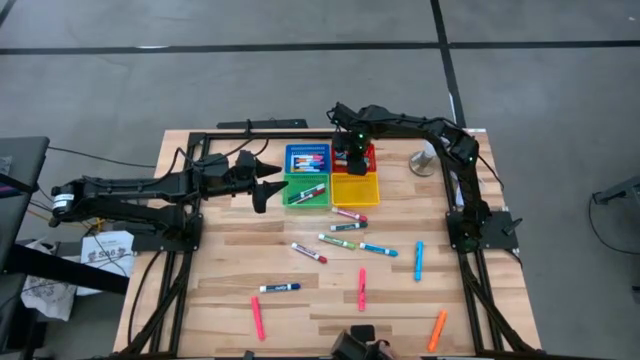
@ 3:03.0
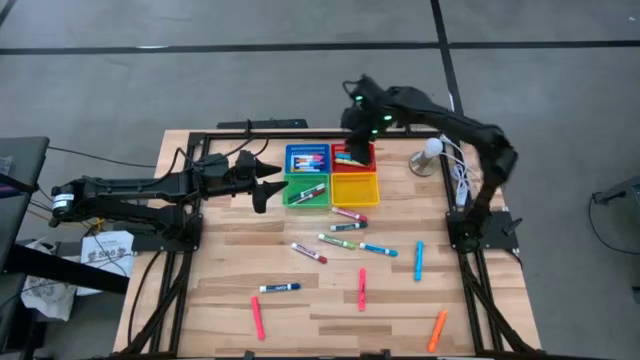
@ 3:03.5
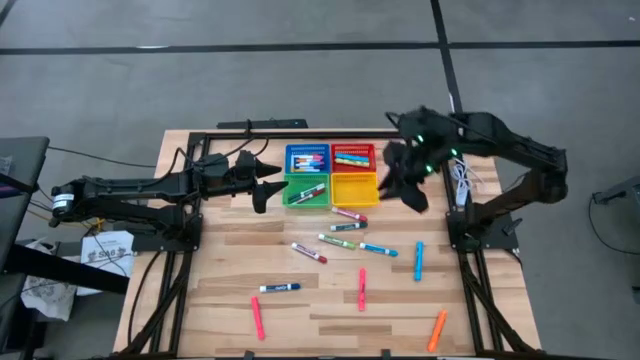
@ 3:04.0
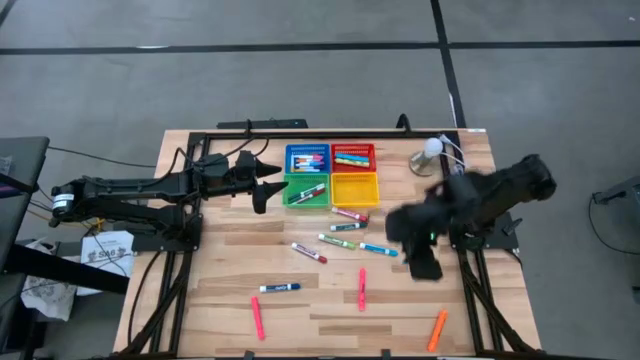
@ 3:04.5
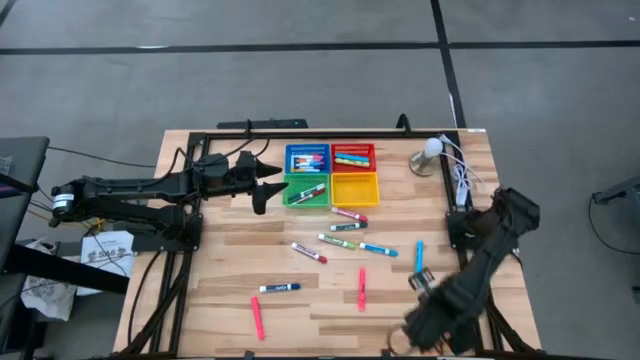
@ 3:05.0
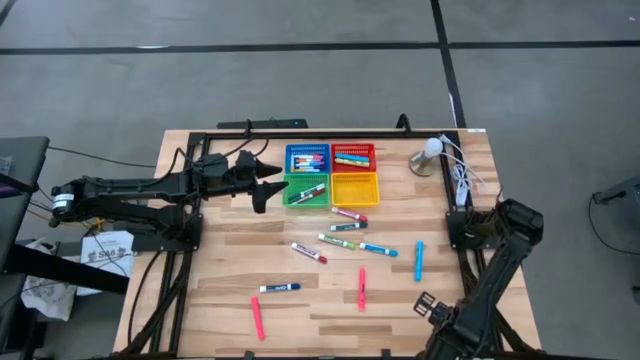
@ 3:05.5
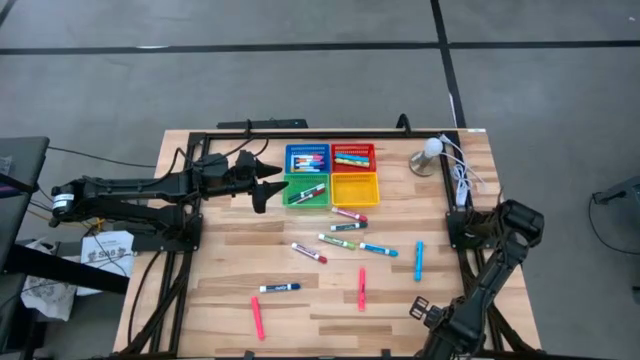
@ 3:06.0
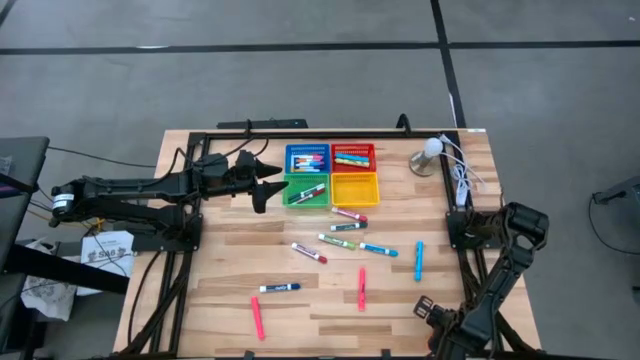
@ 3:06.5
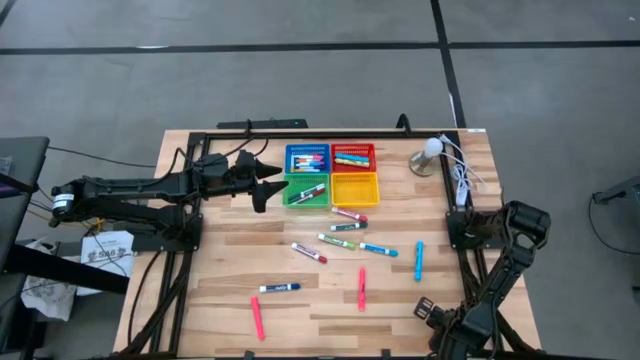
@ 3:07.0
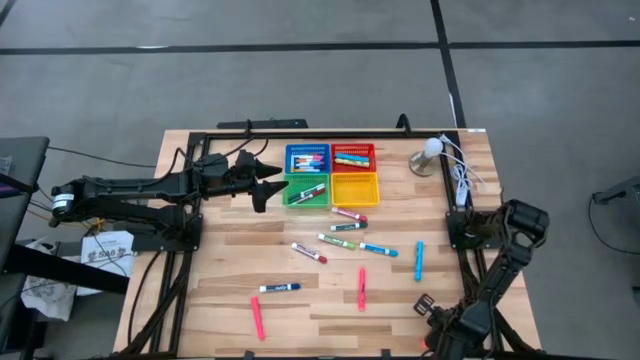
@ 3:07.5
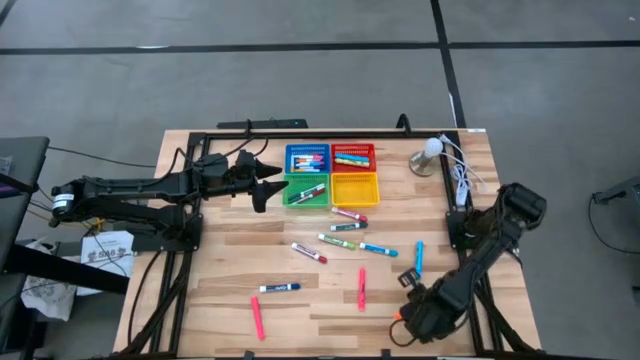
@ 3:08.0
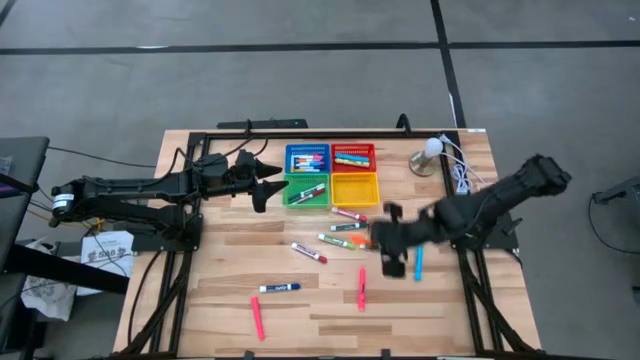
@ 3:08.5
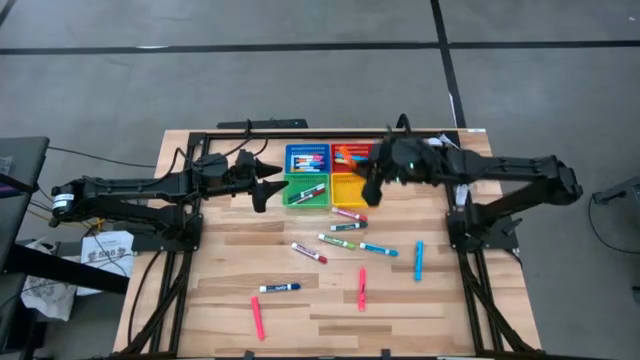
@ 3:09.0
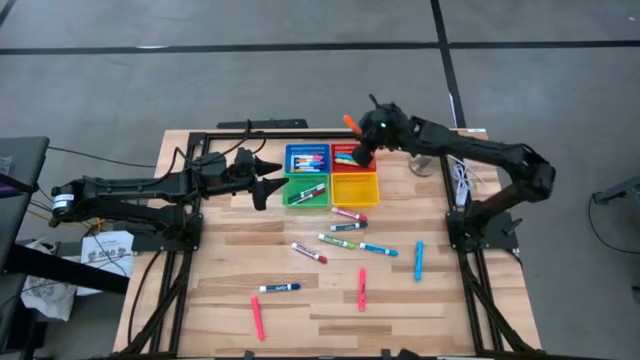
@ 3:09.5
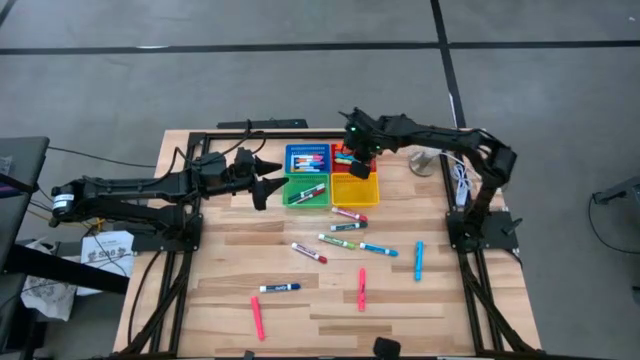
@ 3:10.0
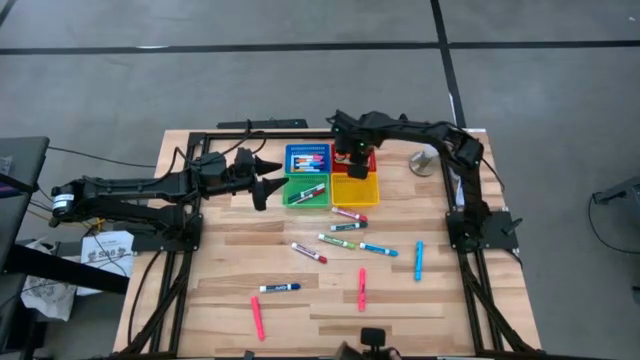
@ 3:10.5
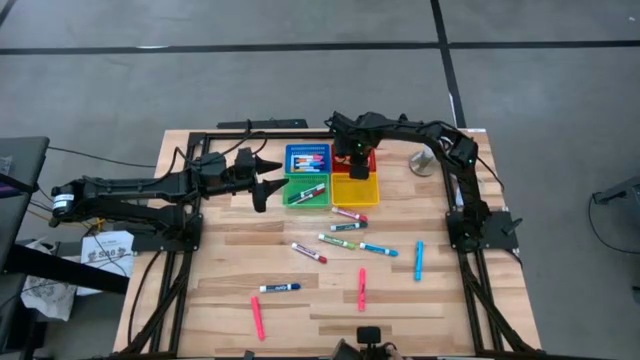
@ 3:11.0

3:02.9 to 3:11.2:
Task: Pick & Place Markers
Put the large orange highlighter into the red bin

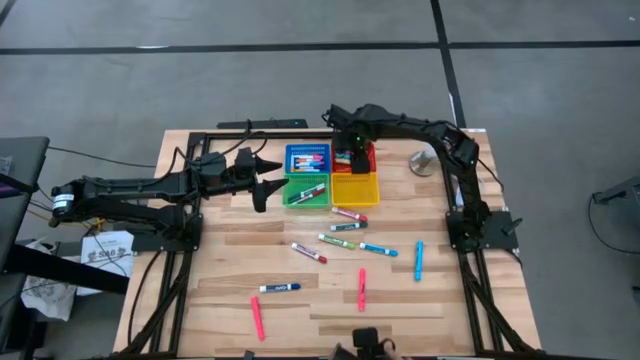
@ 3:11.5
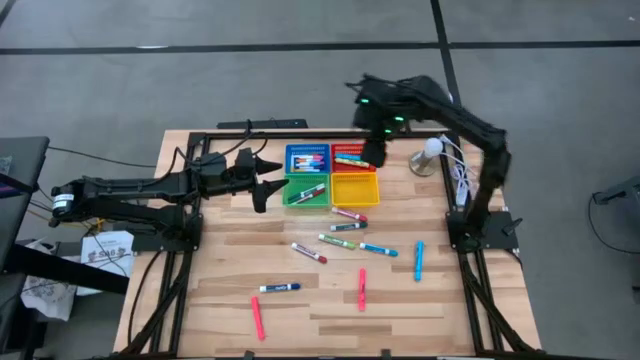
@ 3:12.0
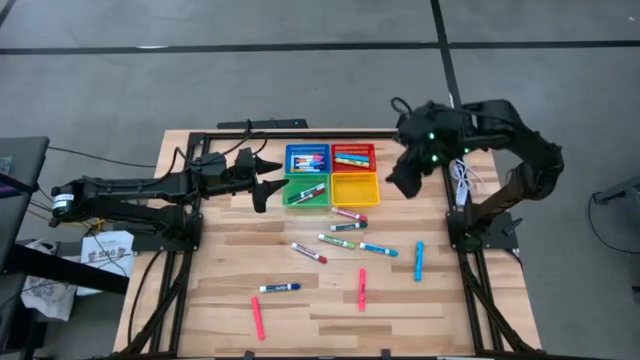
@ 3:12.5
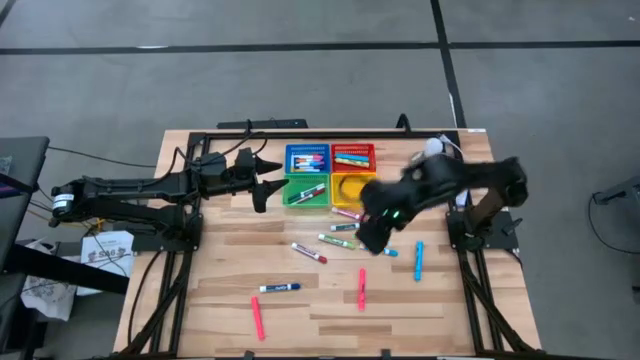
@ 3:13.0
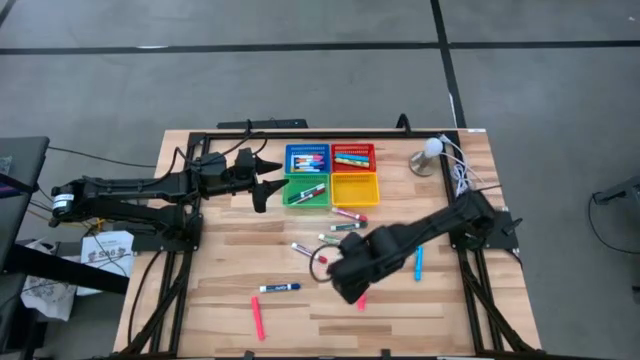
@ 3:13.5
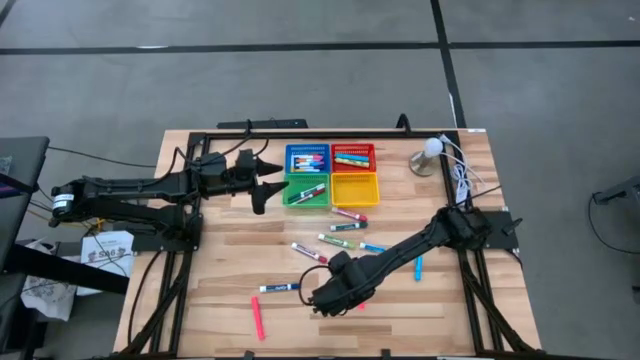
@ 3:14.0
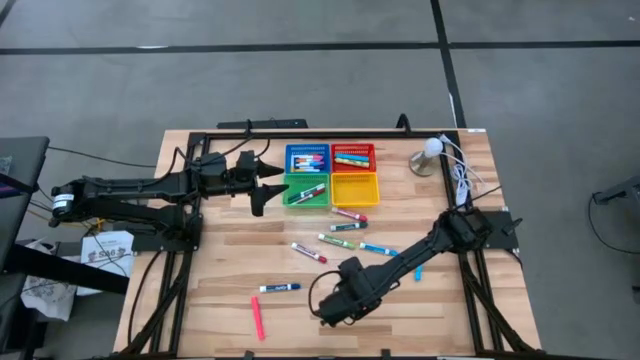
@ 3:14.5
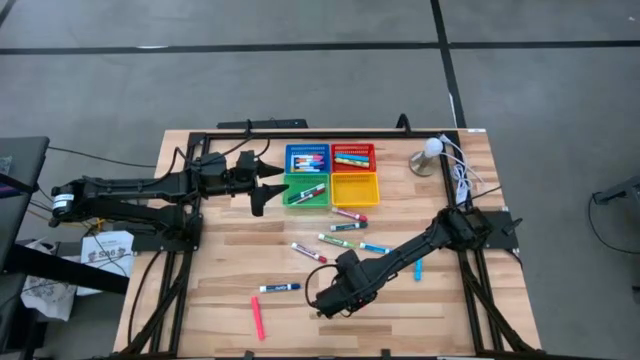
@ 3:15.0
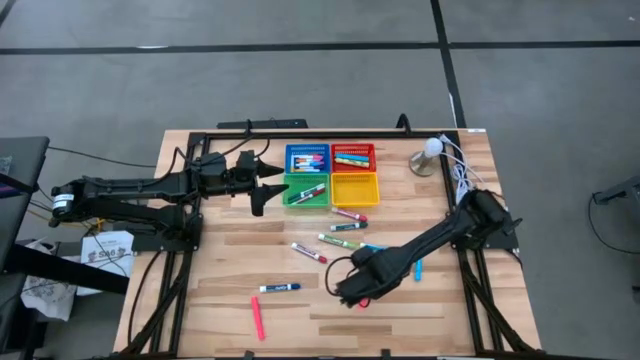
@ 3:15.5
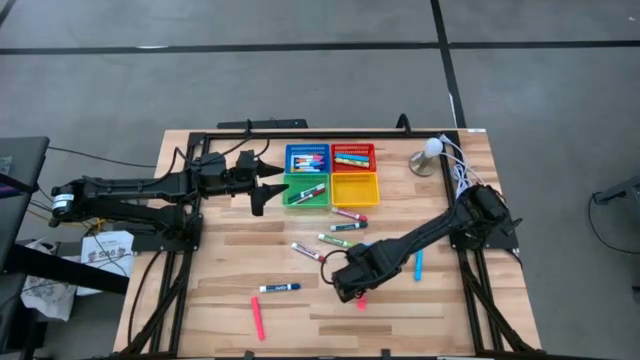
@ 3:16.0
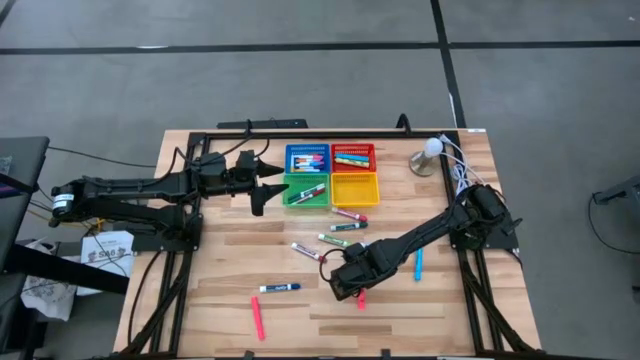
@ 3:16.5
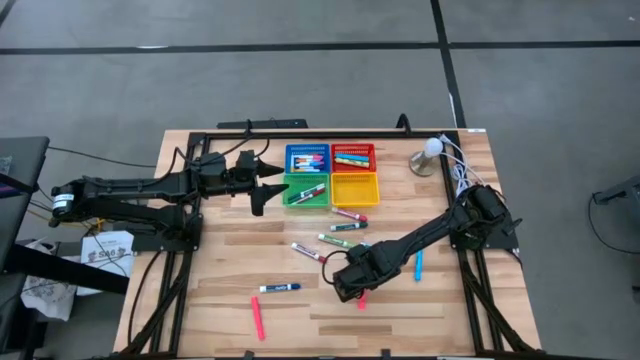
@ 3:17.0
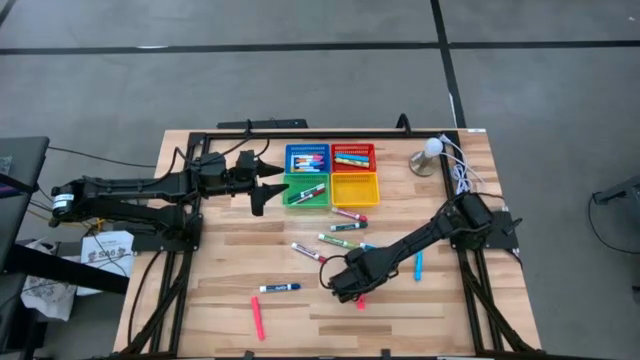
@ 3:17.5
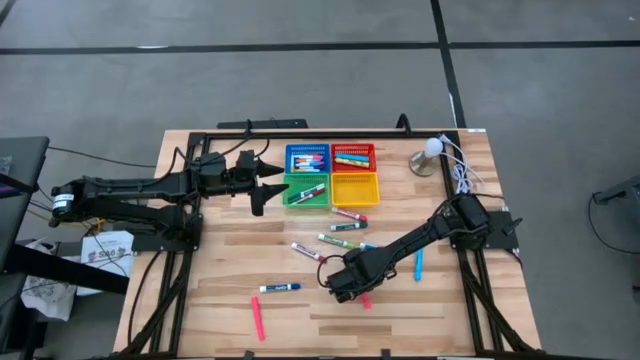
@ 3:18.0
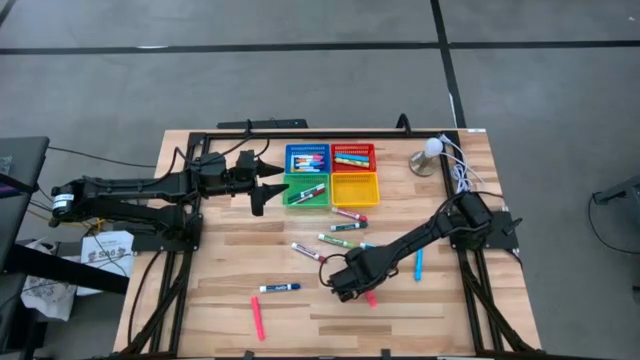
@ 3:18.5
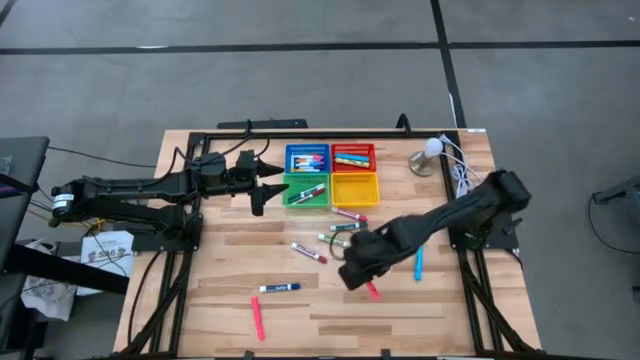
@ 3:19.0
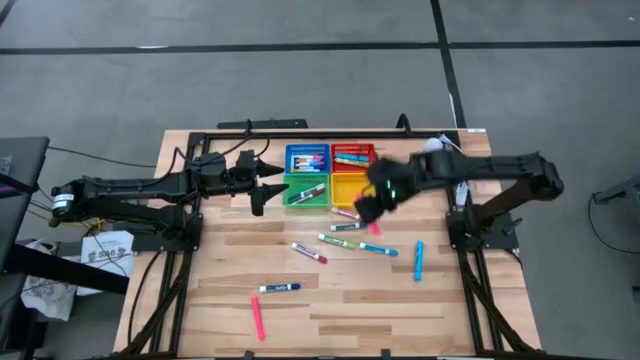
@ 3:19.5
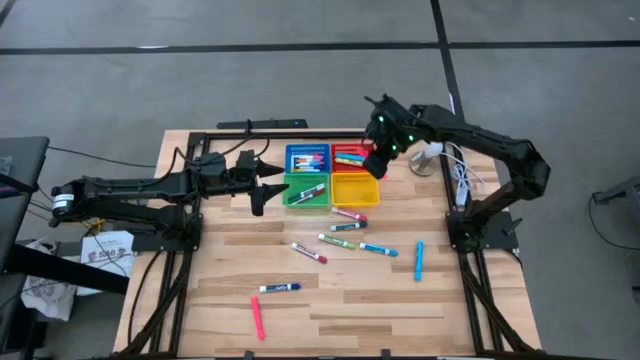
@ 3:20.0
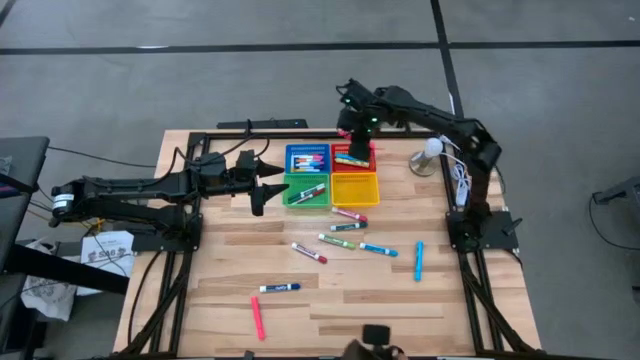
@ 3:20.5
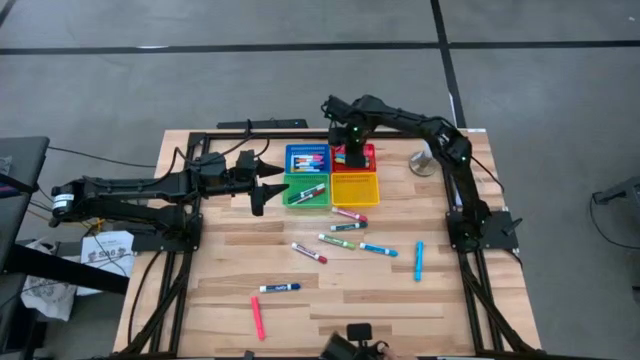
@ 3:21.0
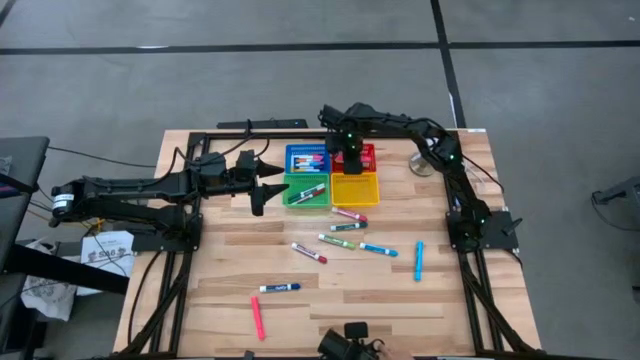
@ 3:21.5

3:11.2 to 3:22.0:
Put the right large pink highlighter into the red bin
